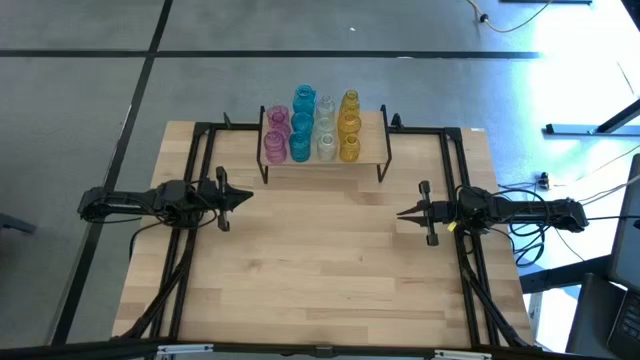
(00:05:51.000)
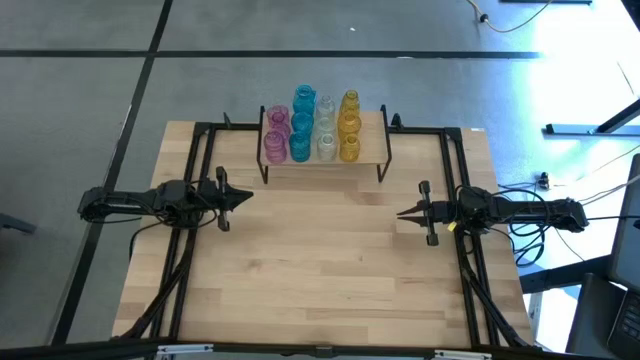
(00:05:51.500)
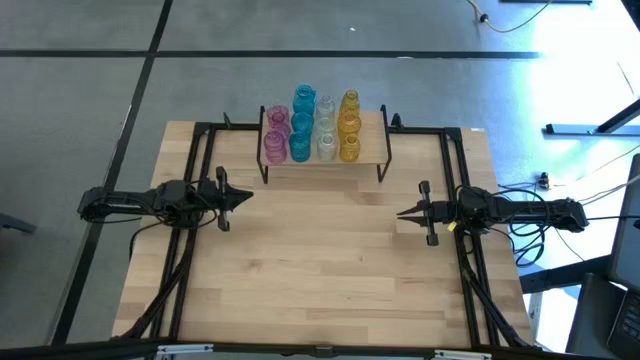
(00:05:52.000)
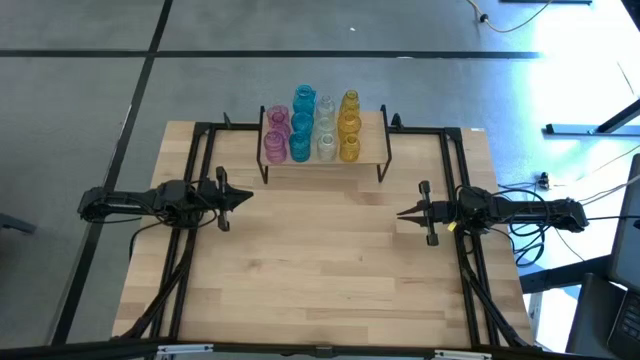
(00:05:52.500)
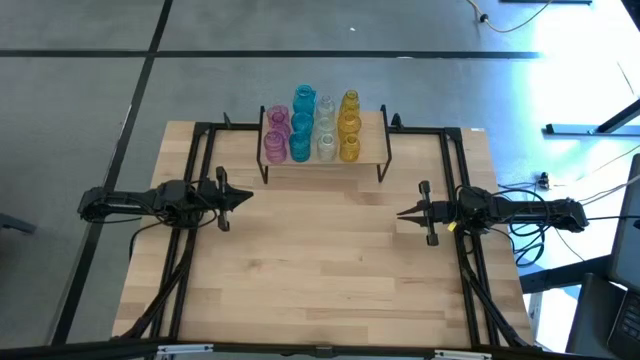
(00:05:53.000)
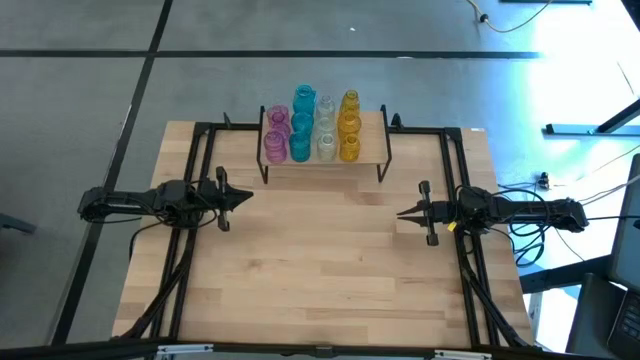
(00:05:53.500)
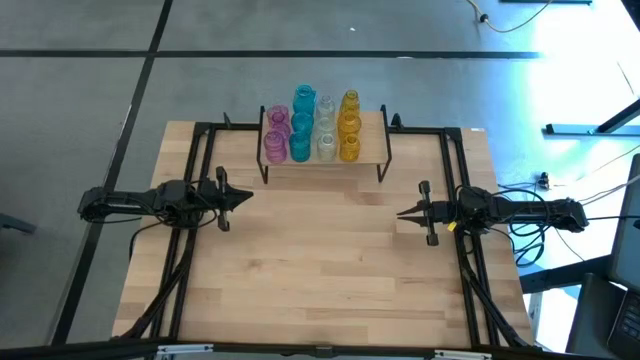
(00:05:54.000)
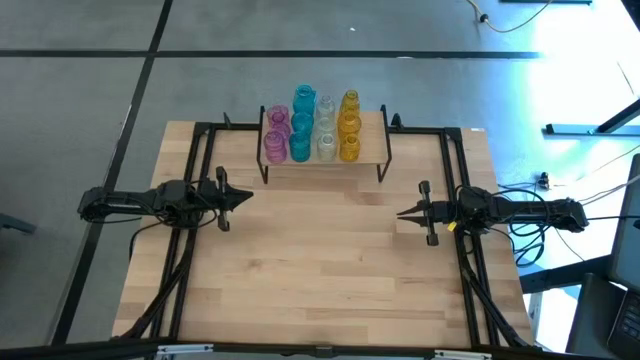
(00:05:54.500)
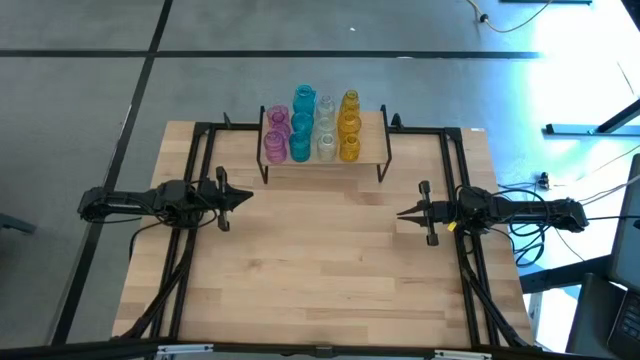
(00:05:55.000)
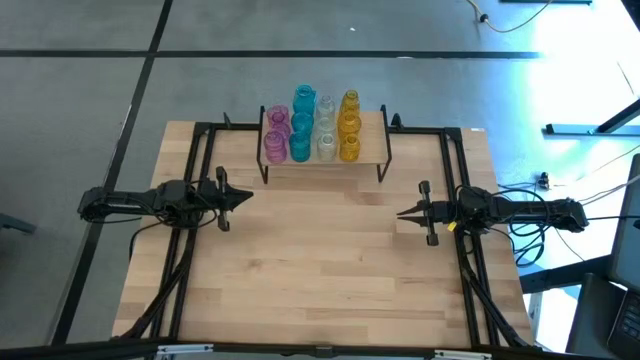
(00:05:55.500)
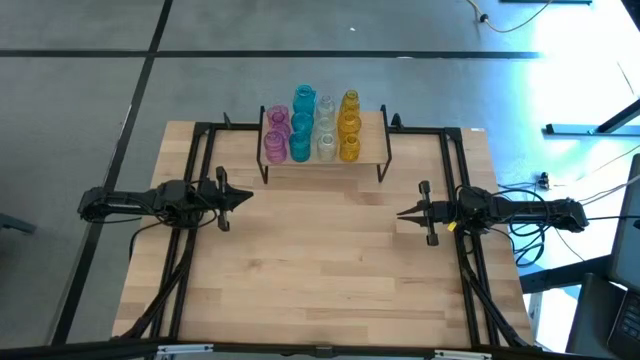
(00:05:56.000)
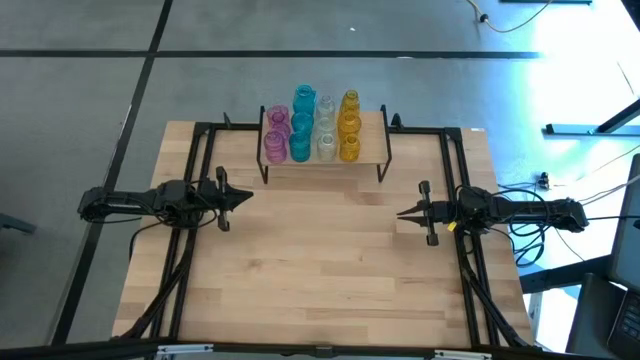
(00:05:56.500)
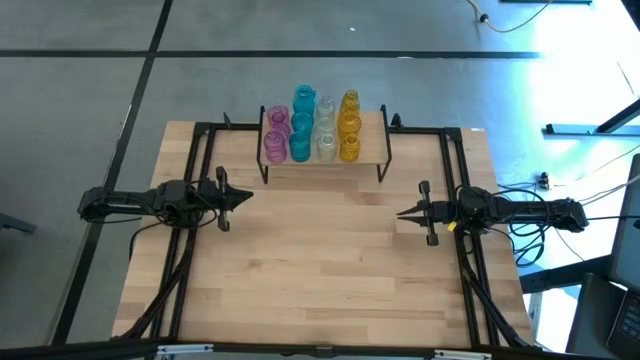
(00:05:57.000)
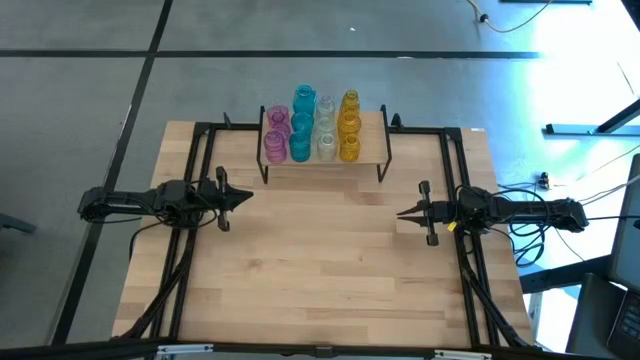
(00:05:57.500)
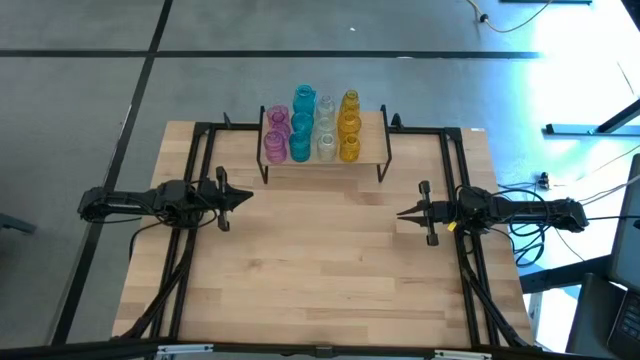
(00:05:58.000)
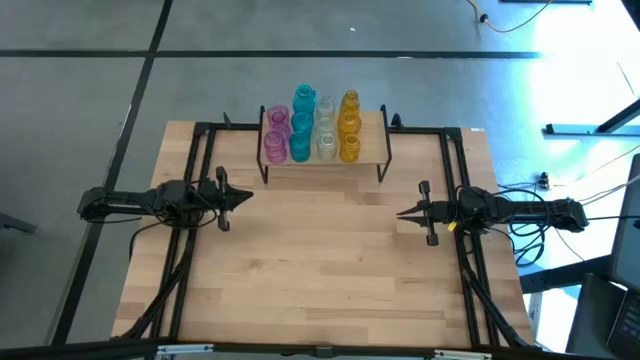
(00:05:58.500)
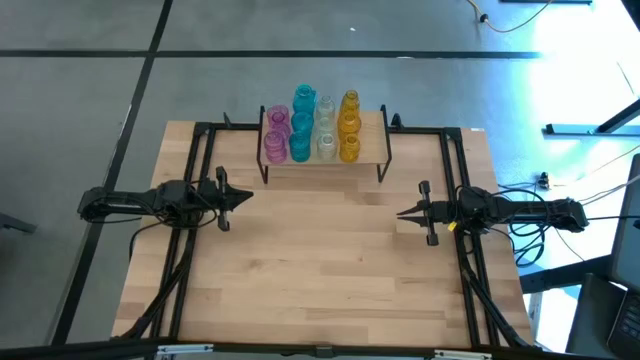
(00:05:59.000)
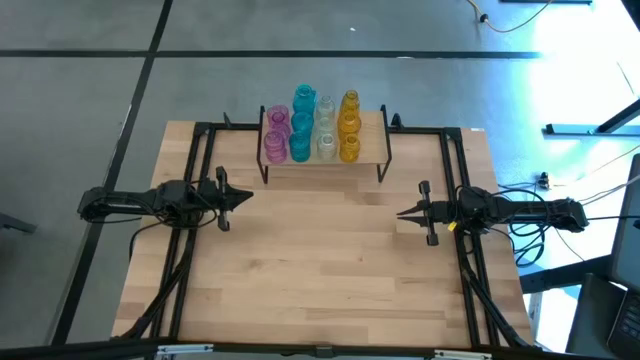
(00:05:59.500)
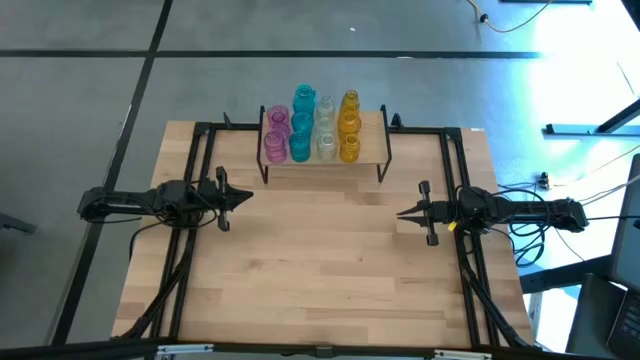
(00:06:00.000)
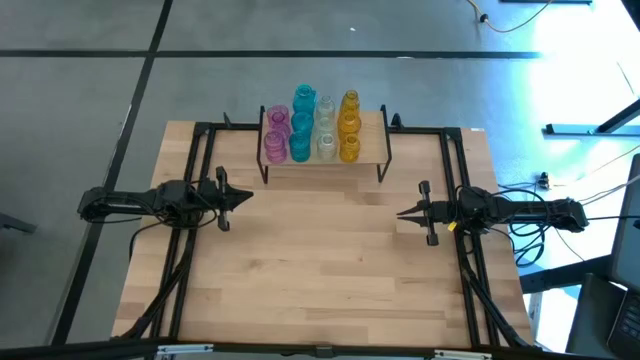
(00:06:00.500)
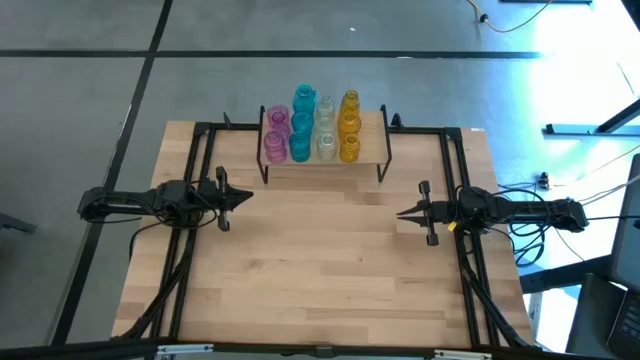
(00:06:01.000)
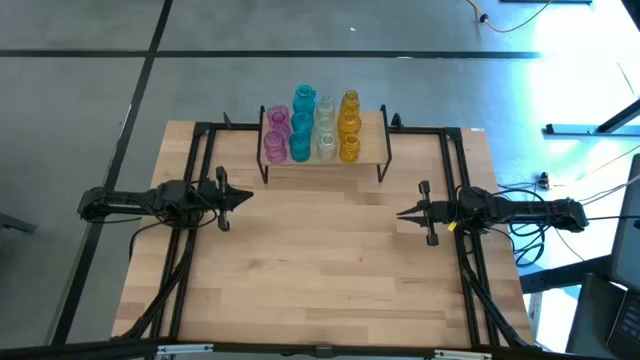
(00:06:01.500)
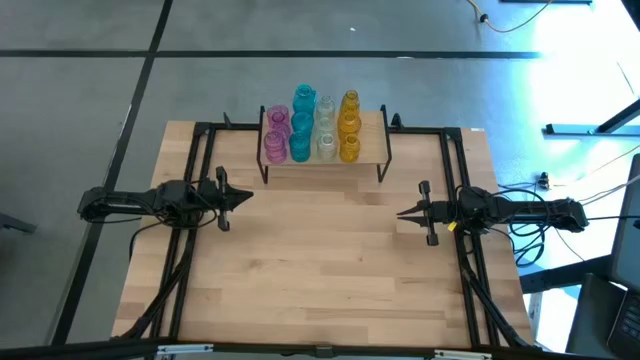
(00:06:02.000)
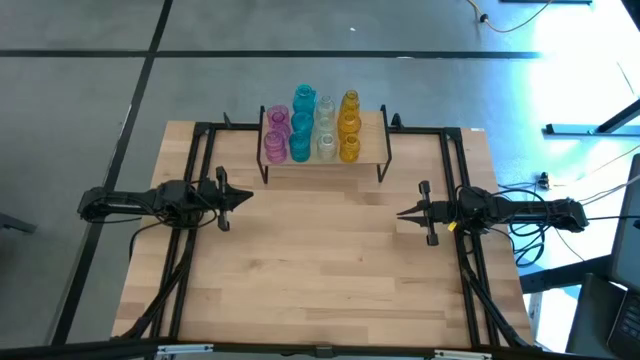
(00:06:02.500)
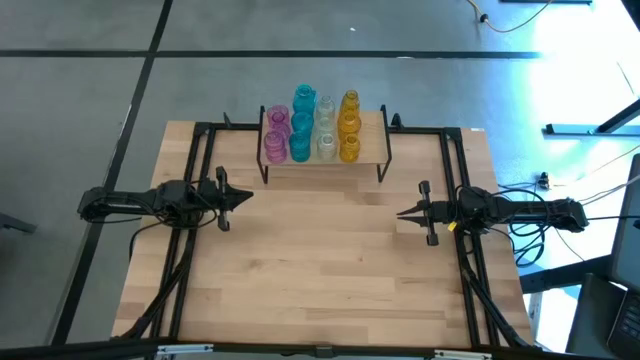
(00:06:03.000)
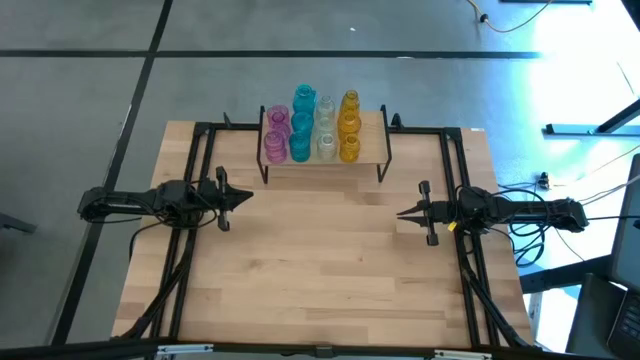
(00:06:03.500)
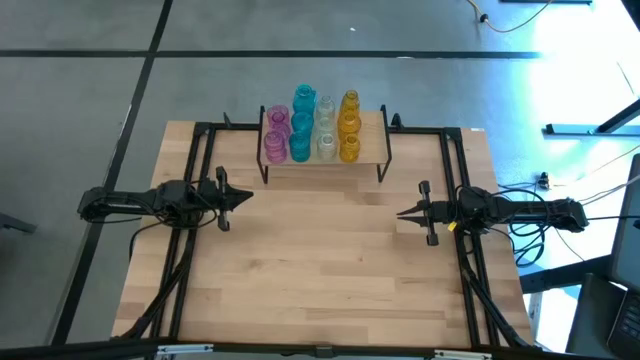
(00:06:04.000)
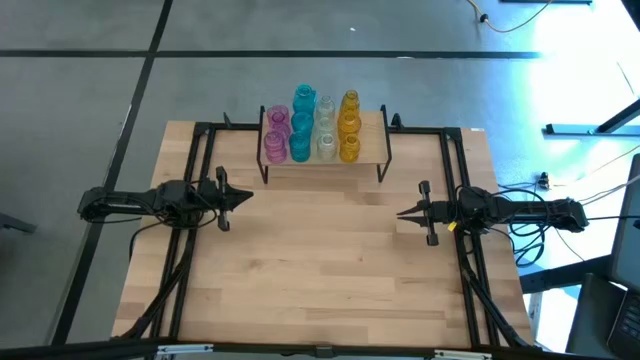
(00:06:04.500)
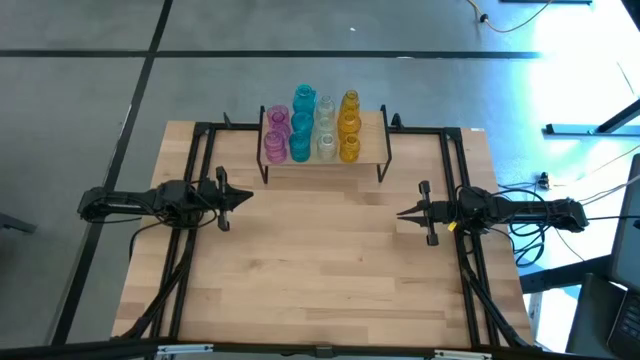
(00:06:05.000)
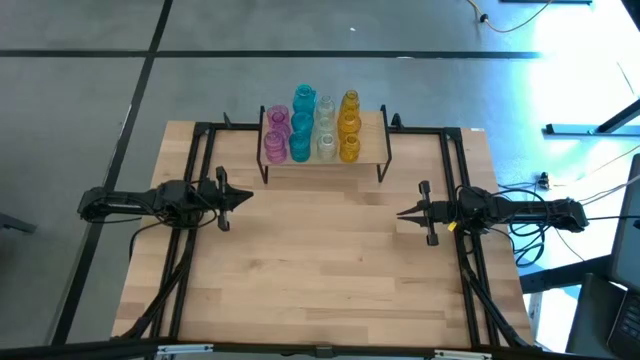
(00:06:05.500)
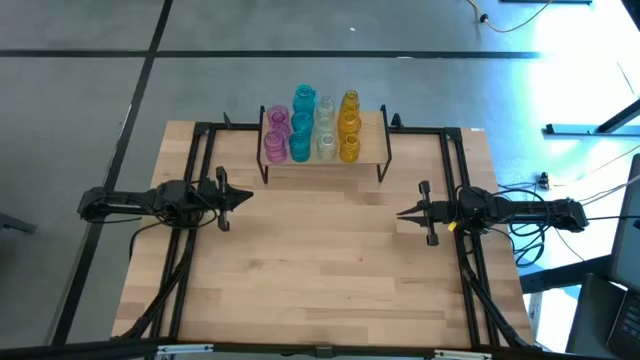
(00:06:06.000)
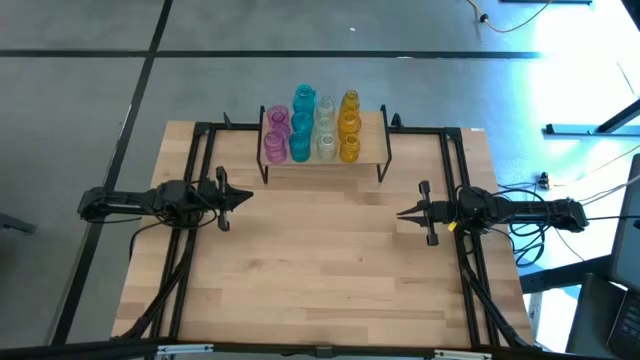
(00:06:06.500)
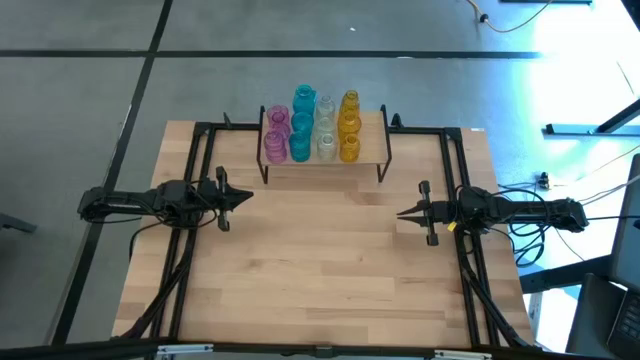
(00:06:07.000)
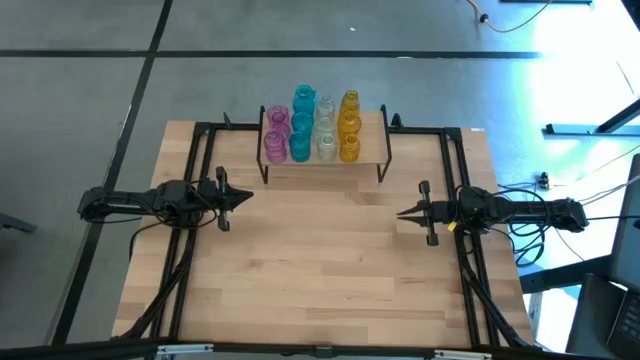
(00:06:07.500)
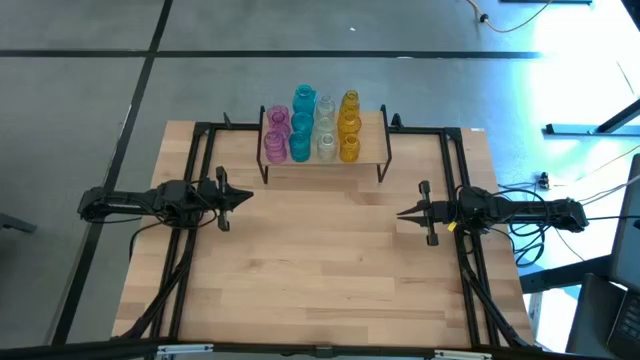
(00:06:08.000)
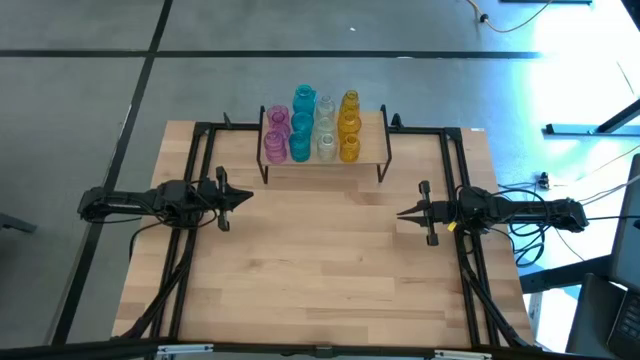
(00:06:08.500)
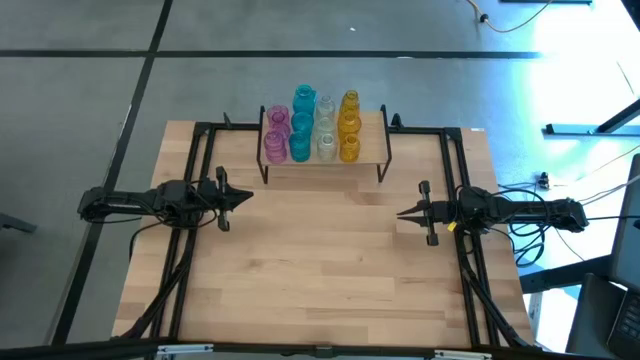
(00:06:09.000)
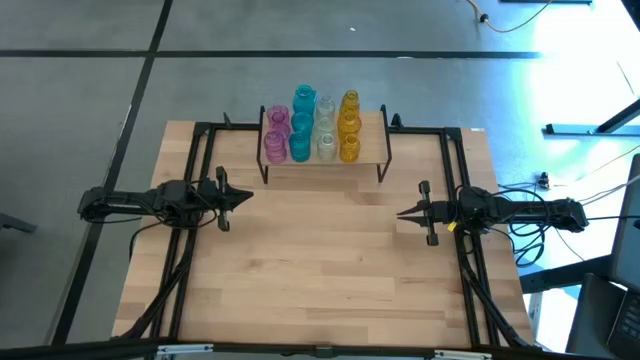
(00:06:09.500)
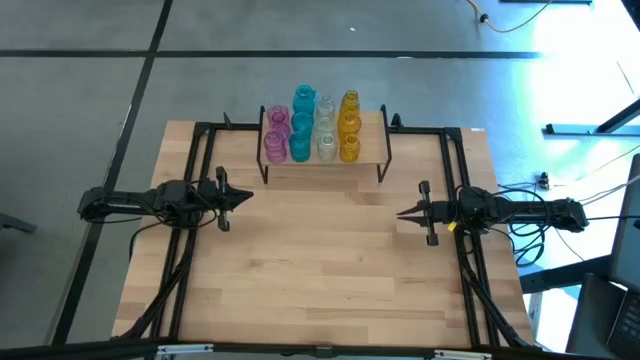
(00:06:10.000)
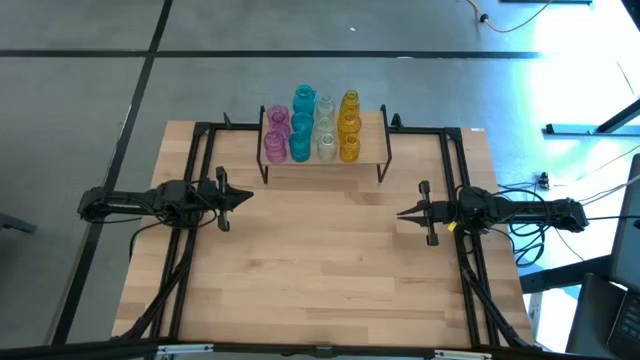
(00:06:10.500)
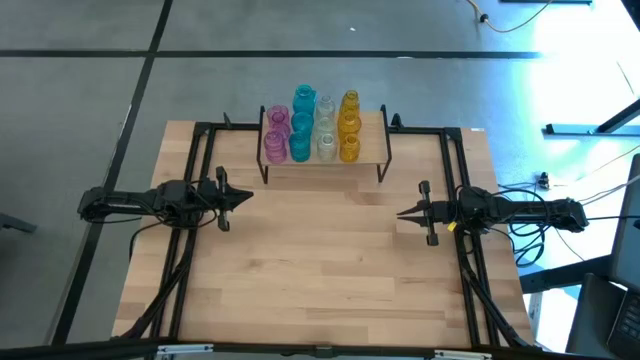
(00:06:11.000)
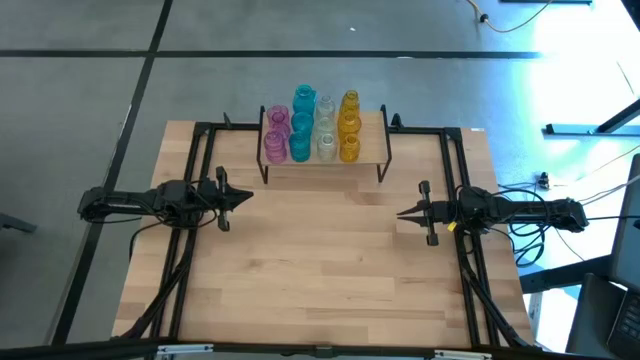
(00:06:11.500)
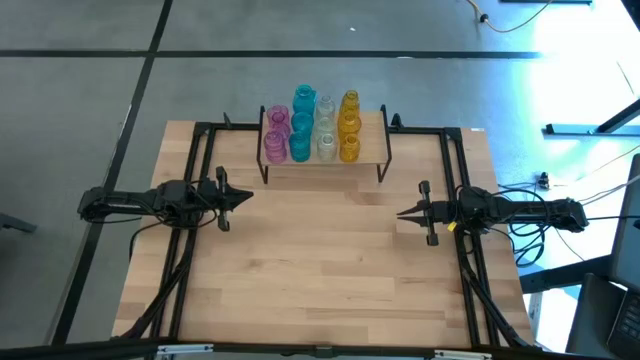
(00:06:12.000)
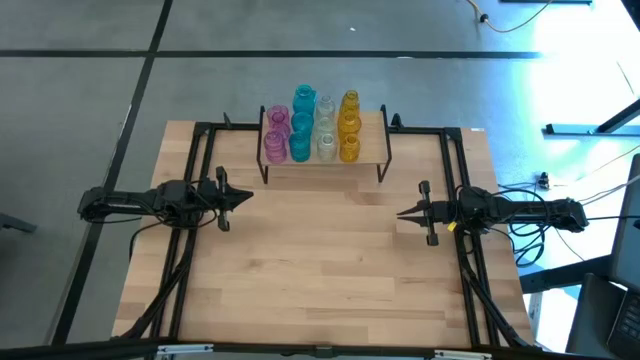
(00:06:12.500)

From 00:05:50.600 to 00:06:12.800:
Task: sort vases onto shelf
Return to Home Position
